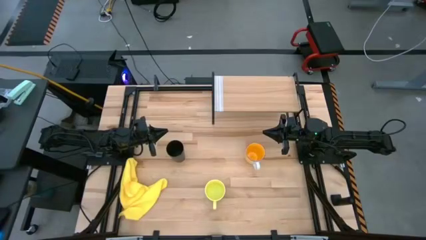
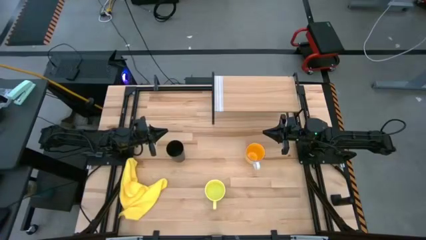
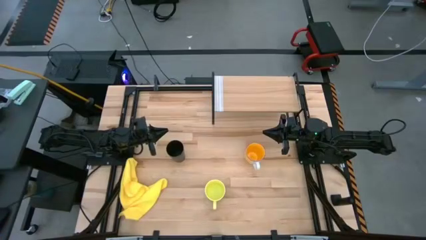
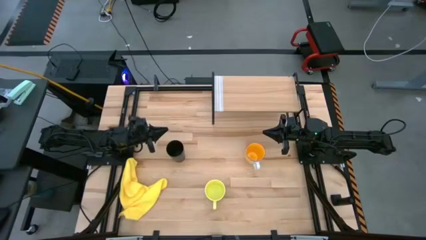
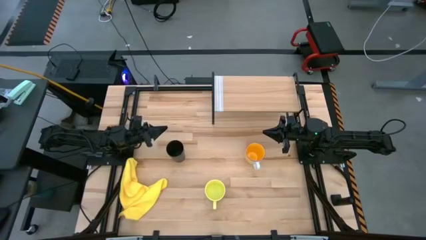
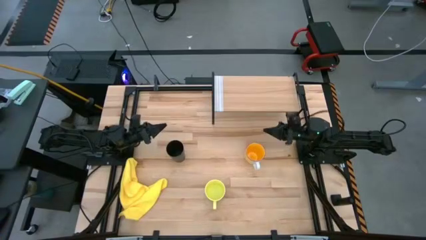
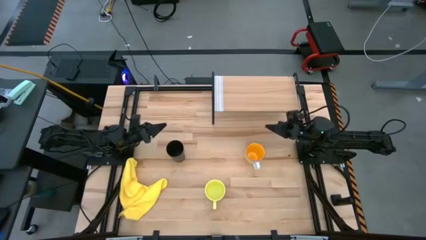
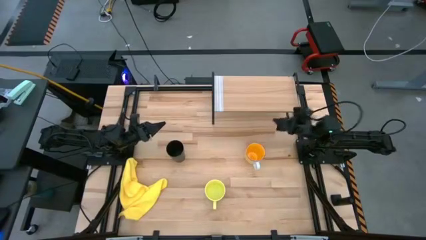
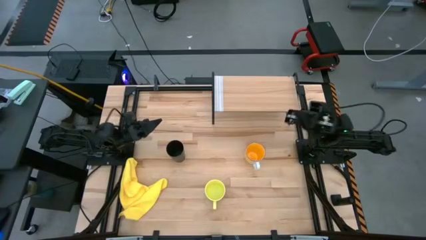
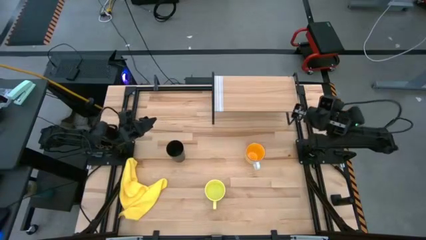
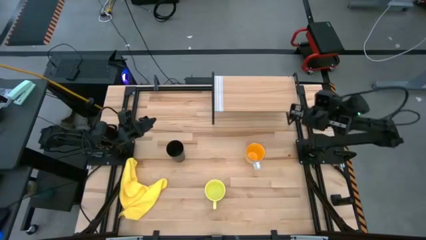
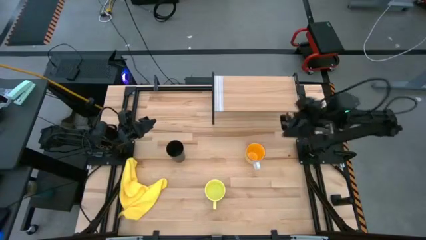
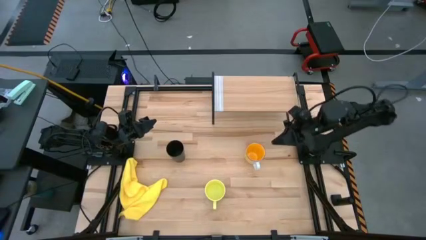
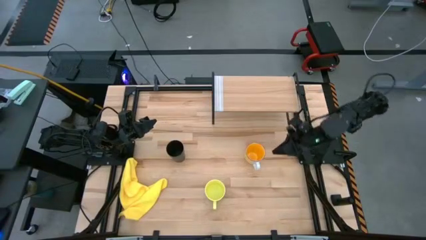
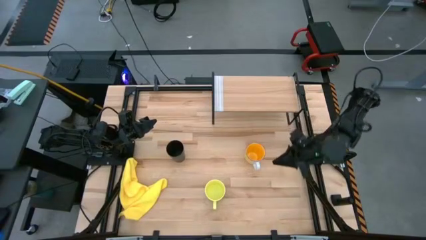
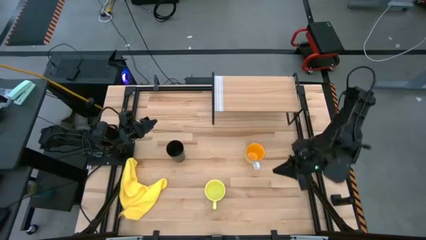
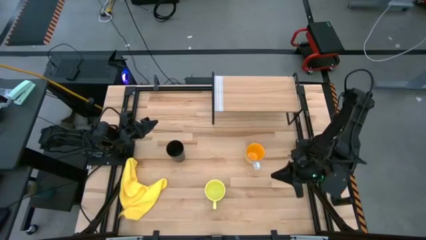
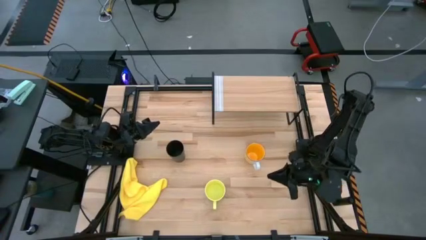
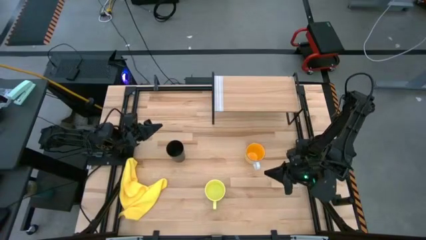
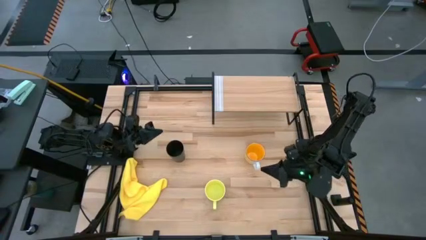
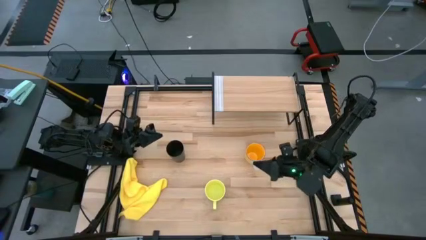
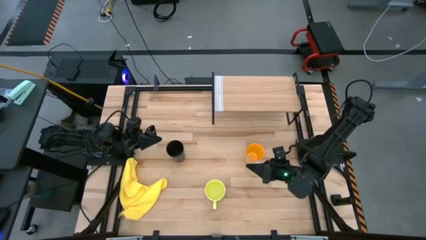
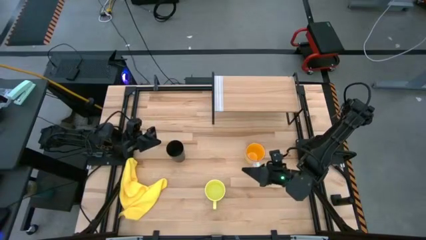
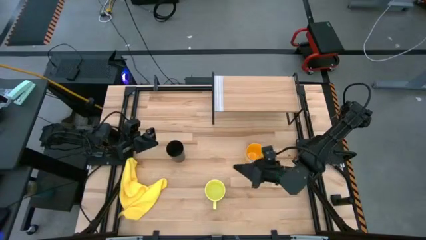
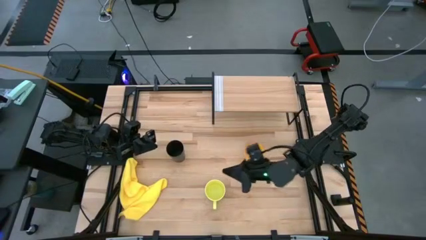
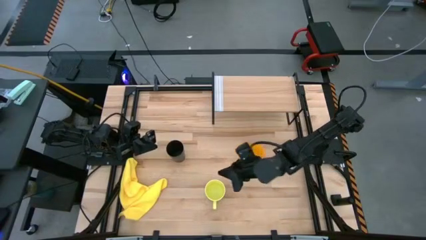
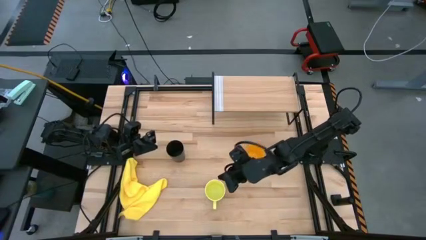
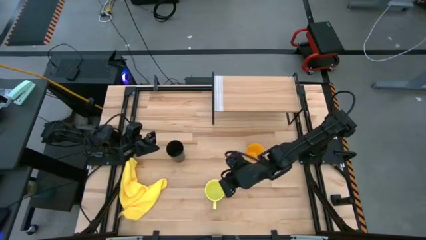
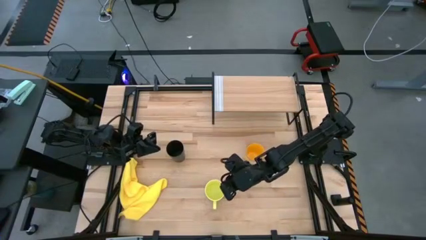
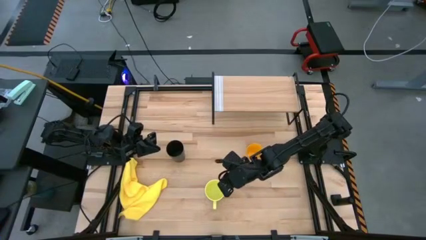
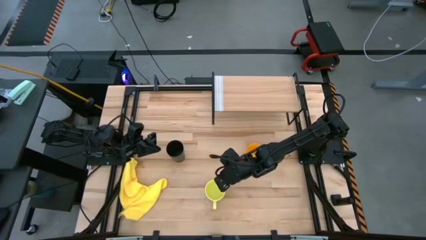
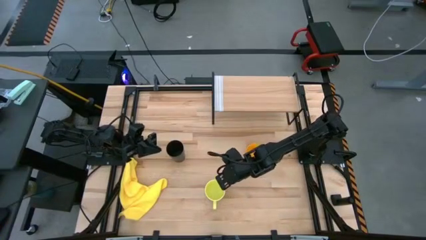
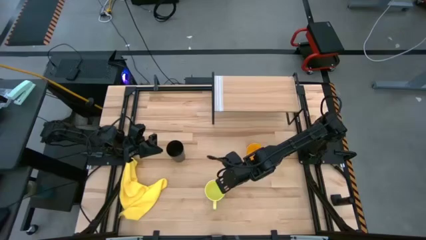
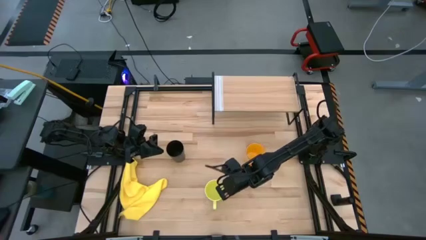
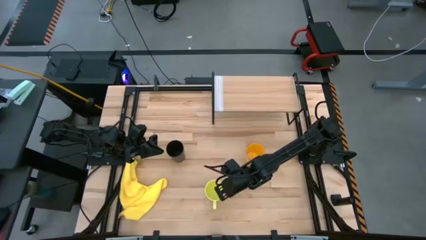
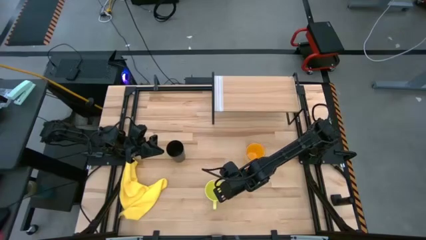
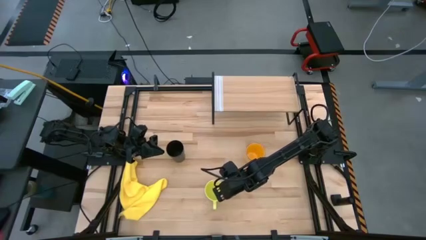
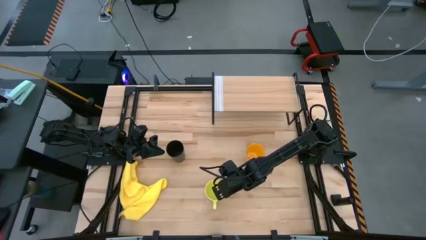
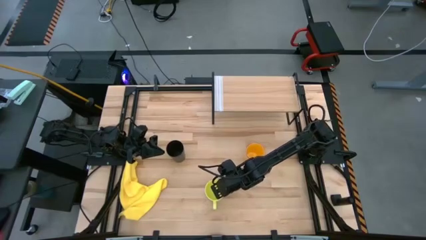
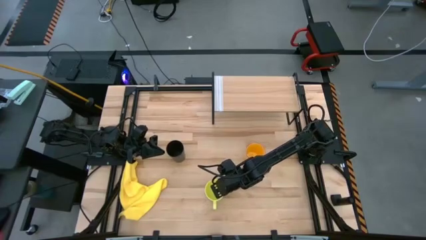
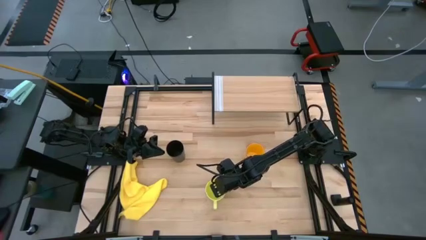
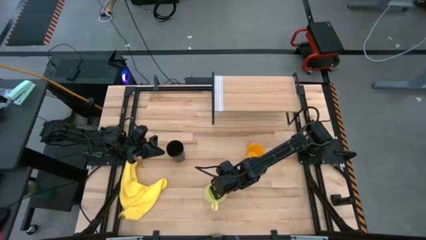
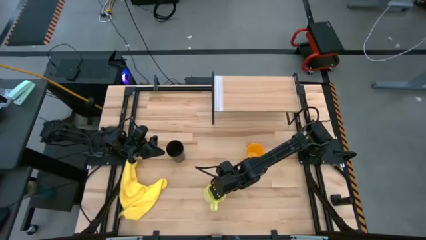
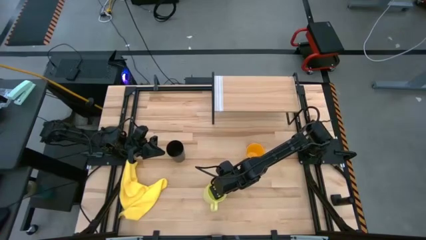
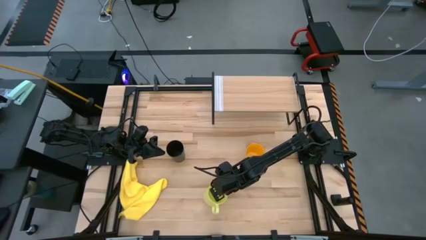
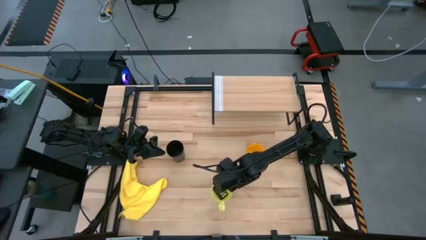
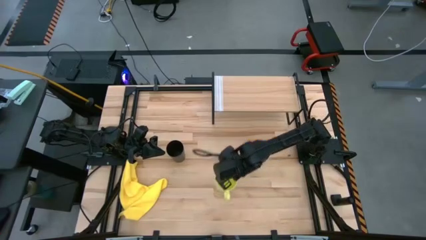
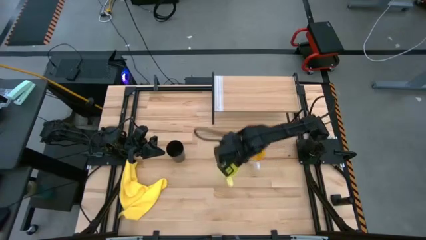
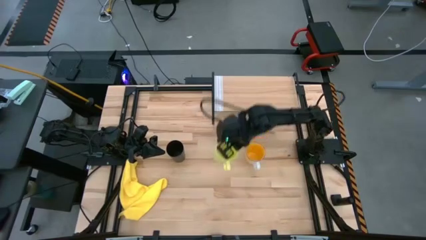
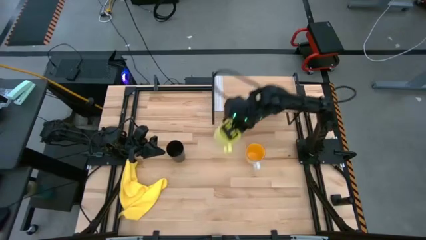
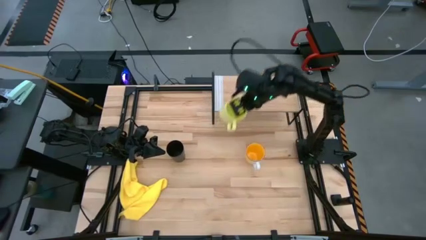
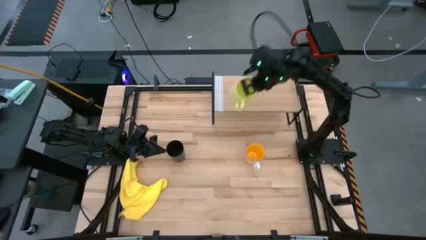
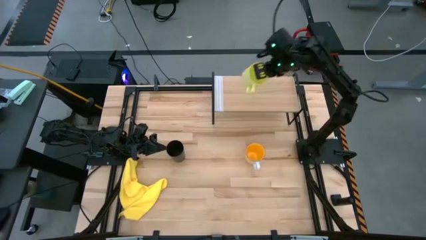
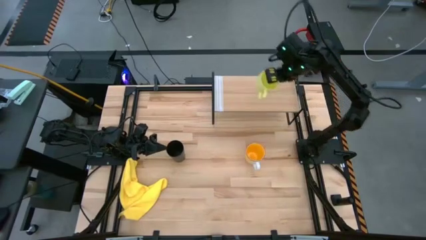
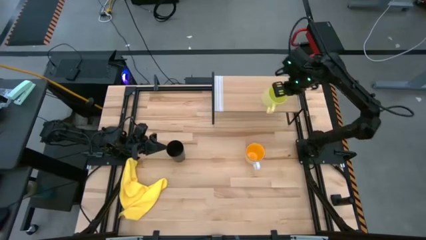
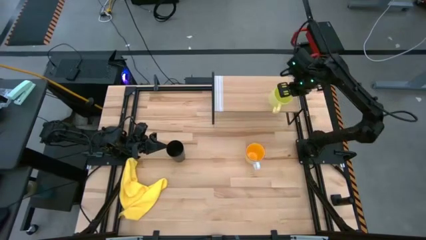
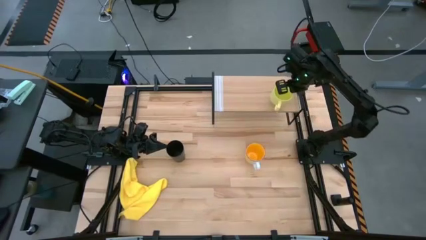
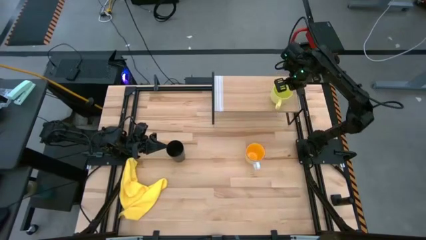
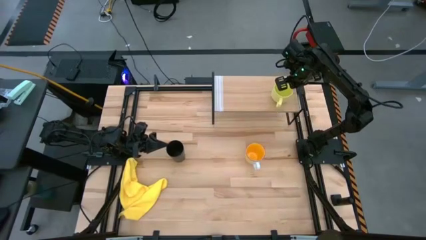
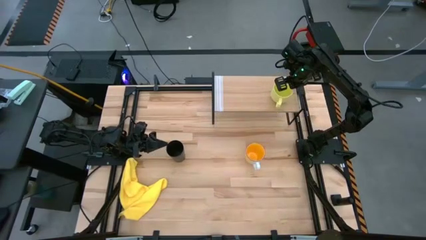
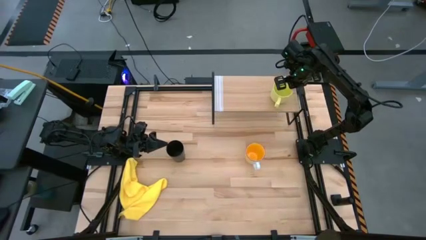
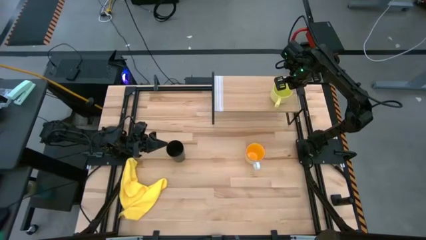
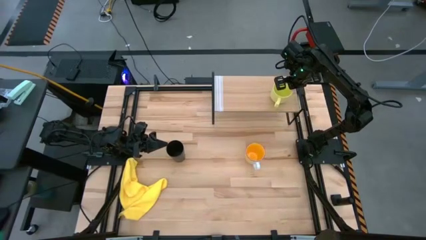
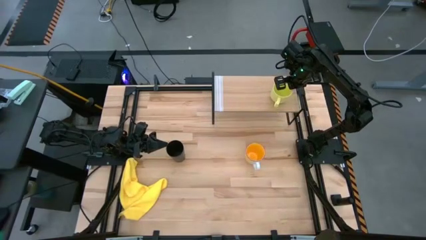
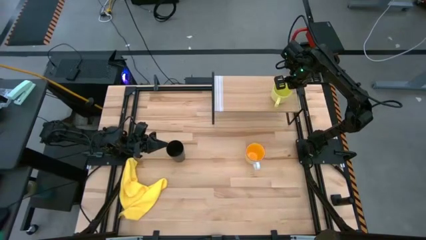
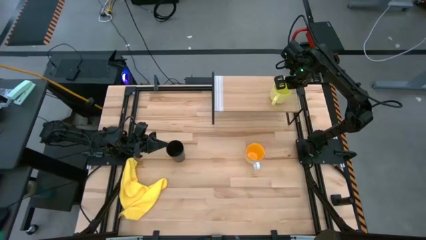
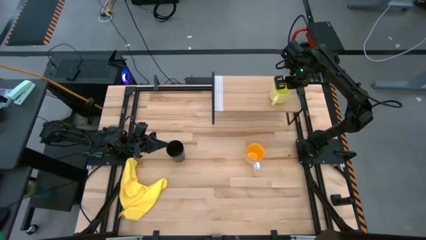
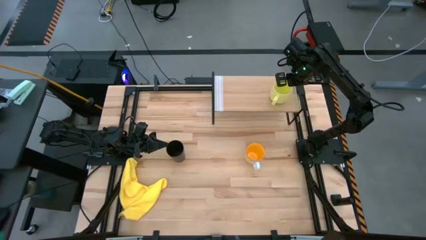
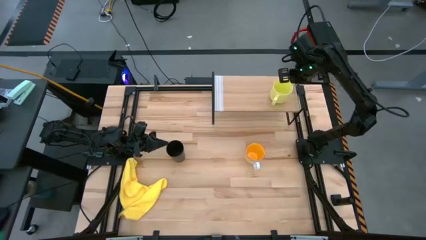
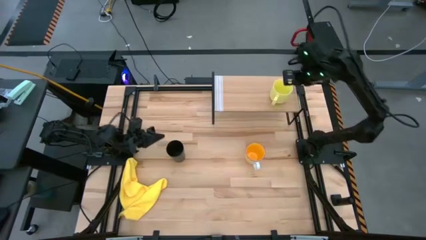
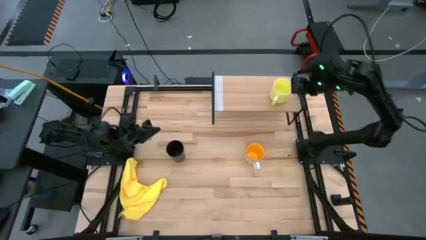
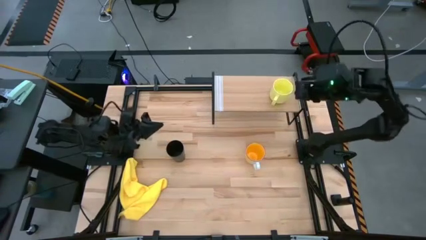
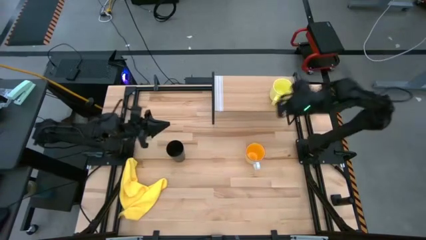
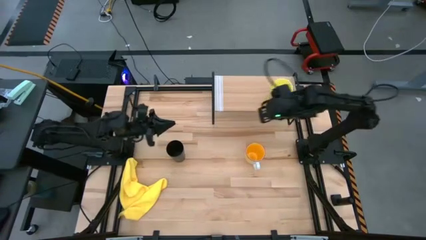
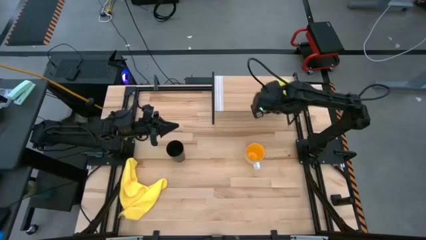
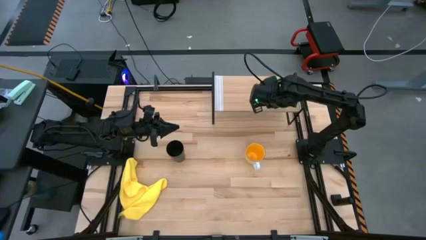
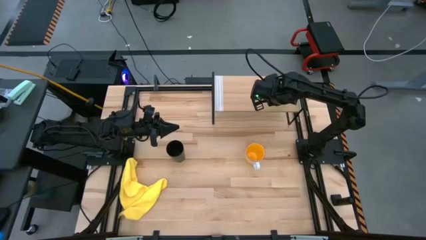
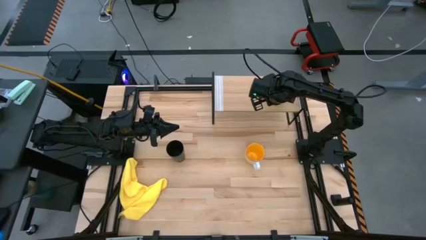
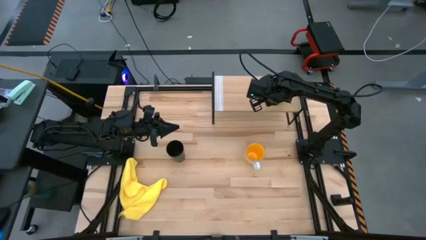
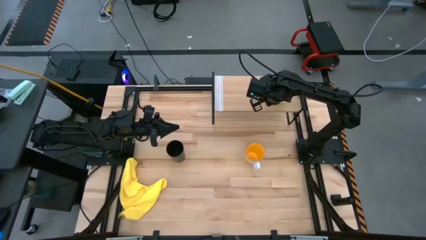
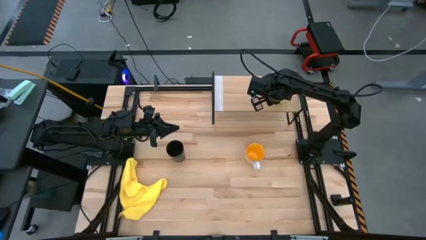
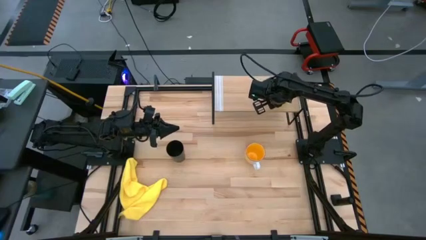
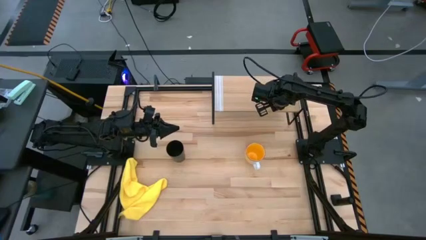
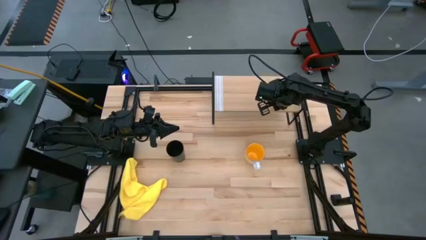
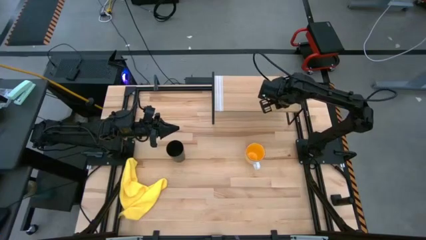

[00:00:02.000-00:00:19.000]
Task: Stack small to large cups/mugs on shelf
Put the yellow mug on the shelf
